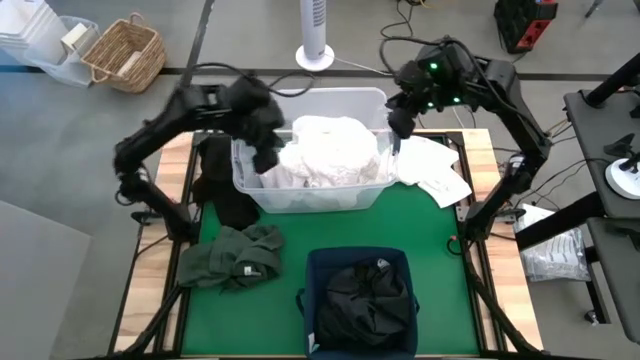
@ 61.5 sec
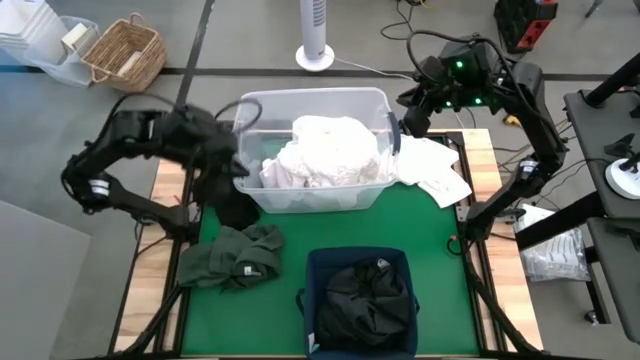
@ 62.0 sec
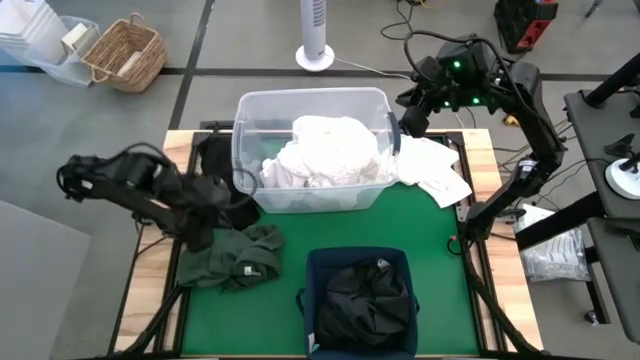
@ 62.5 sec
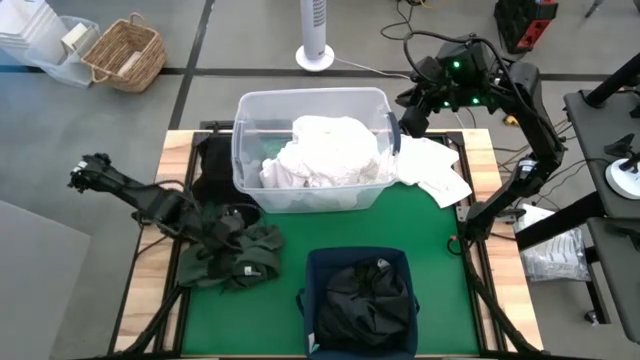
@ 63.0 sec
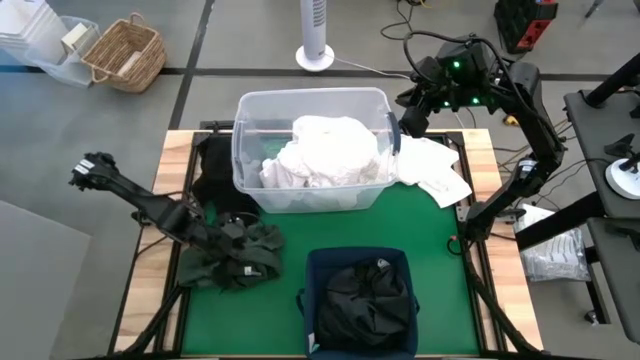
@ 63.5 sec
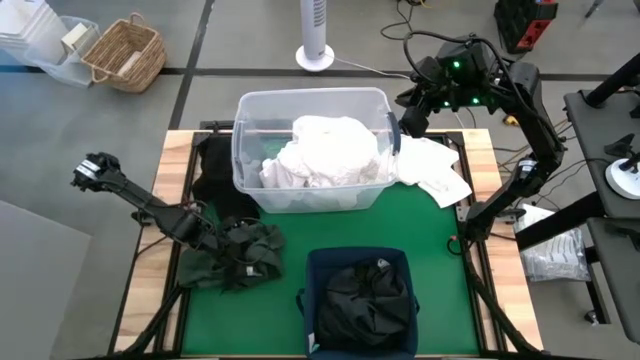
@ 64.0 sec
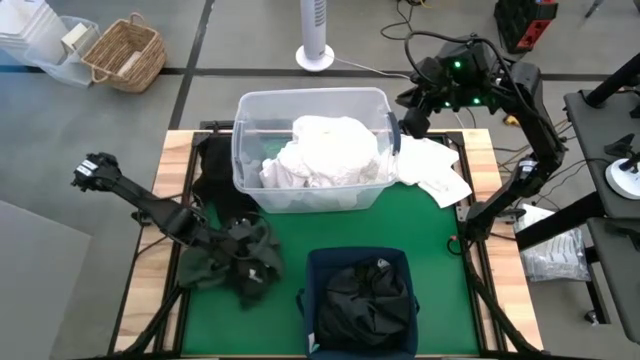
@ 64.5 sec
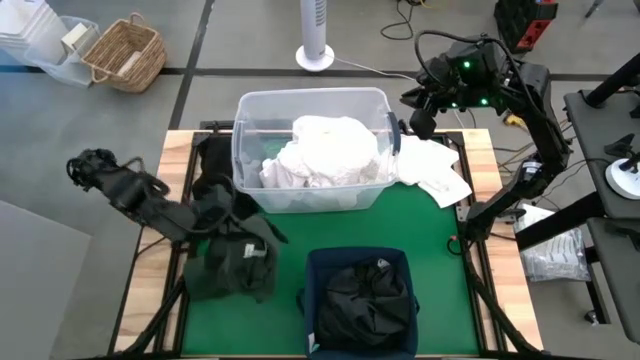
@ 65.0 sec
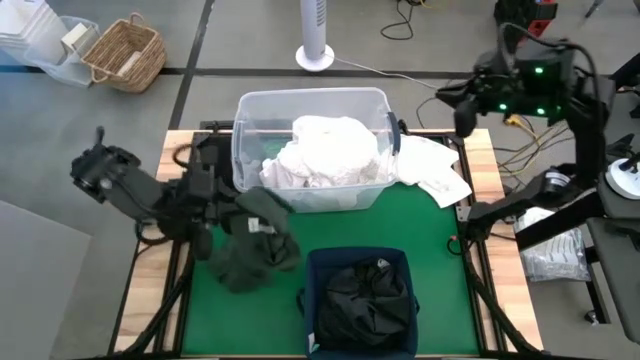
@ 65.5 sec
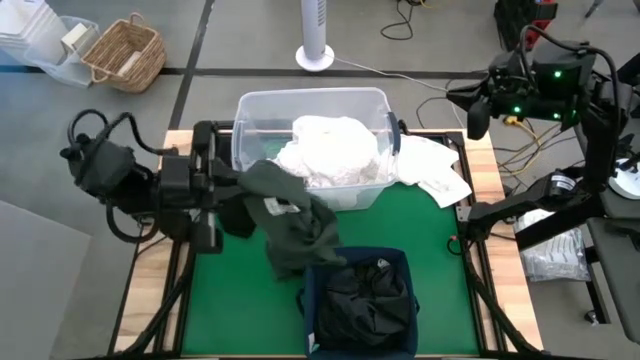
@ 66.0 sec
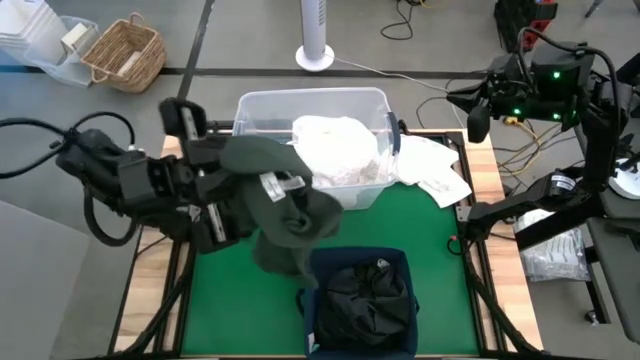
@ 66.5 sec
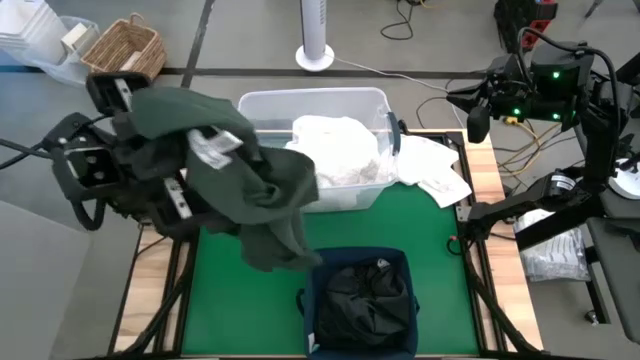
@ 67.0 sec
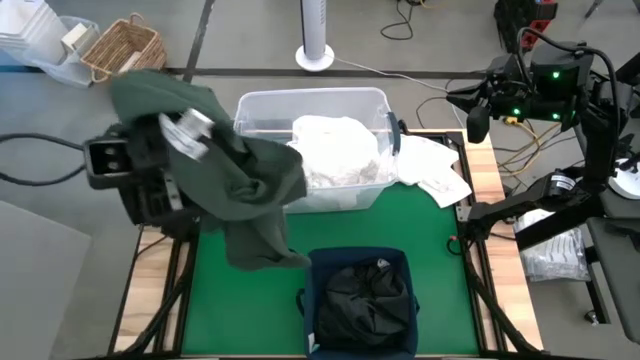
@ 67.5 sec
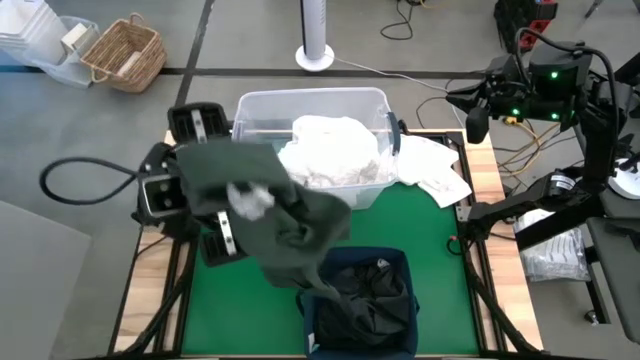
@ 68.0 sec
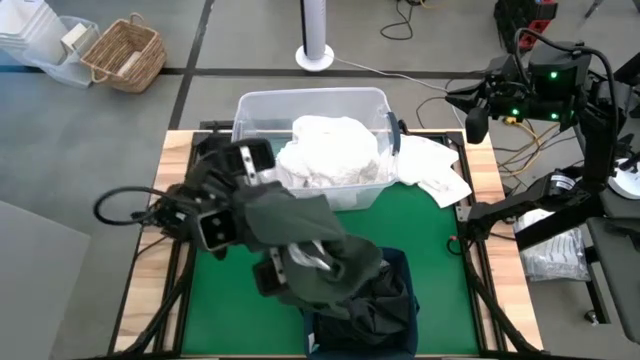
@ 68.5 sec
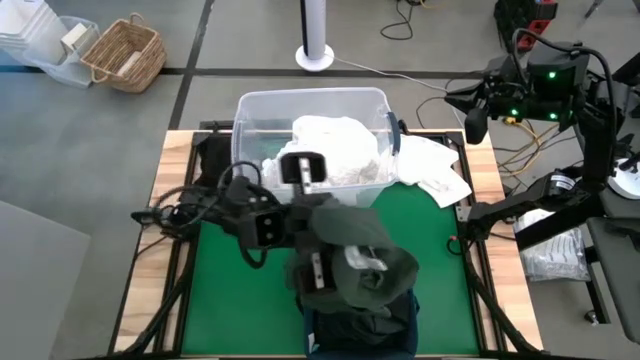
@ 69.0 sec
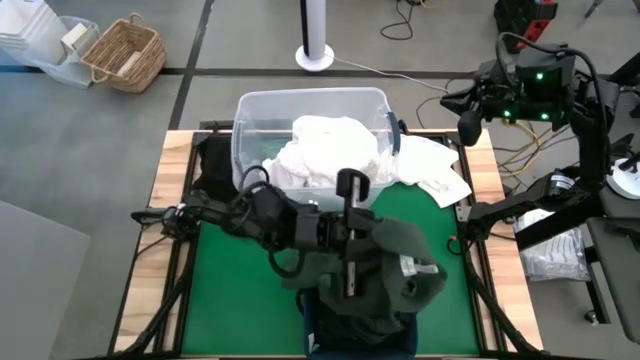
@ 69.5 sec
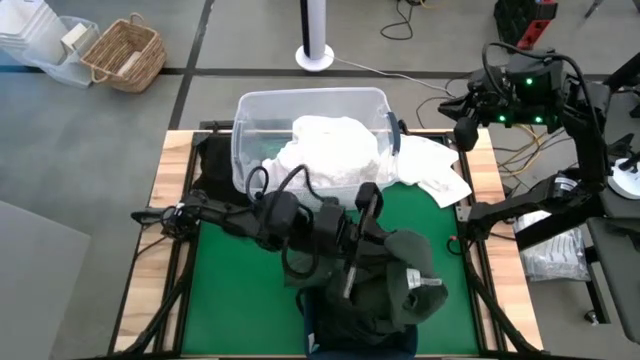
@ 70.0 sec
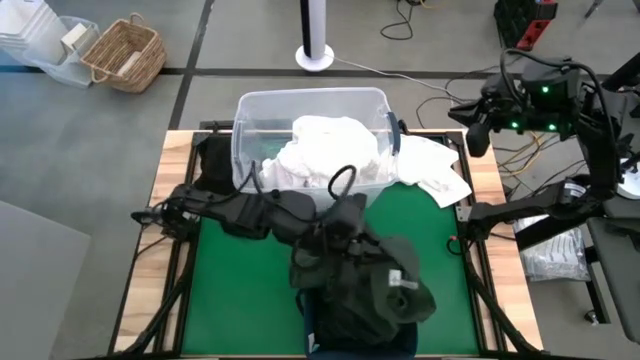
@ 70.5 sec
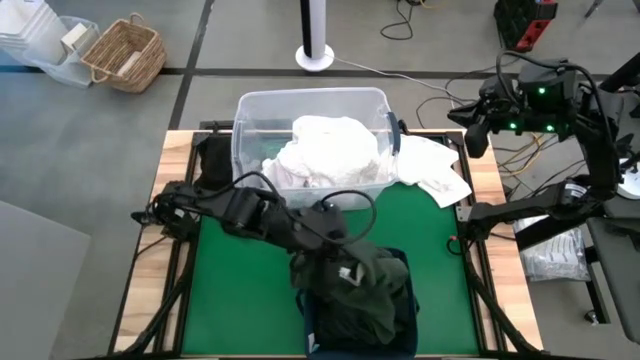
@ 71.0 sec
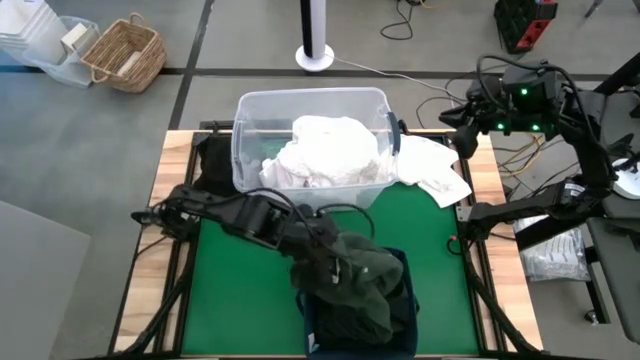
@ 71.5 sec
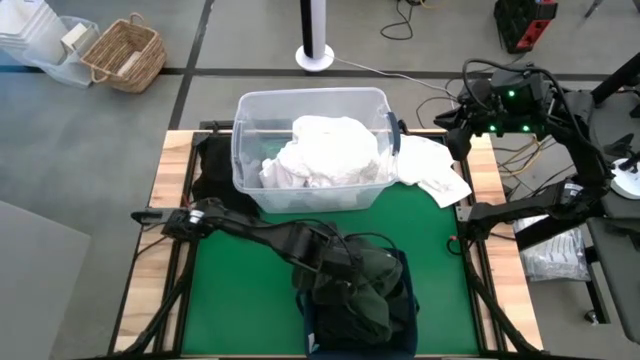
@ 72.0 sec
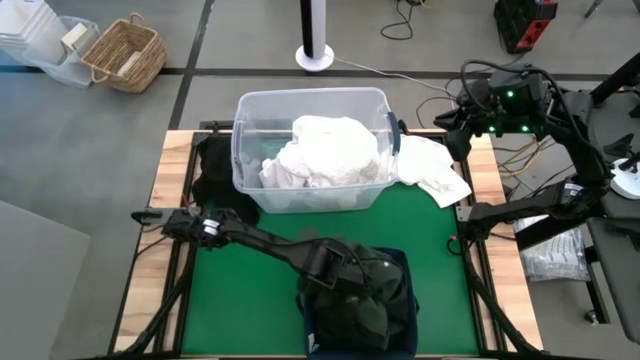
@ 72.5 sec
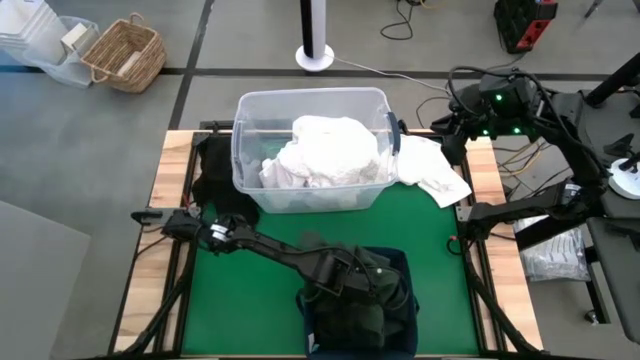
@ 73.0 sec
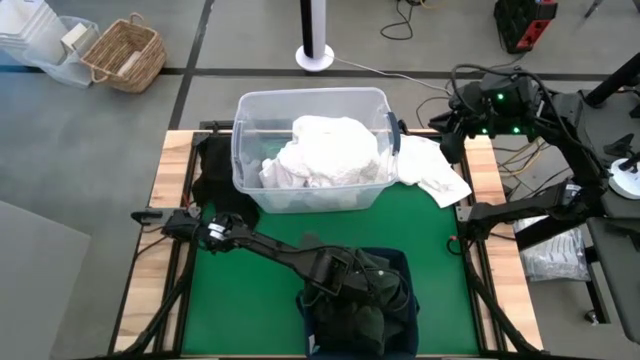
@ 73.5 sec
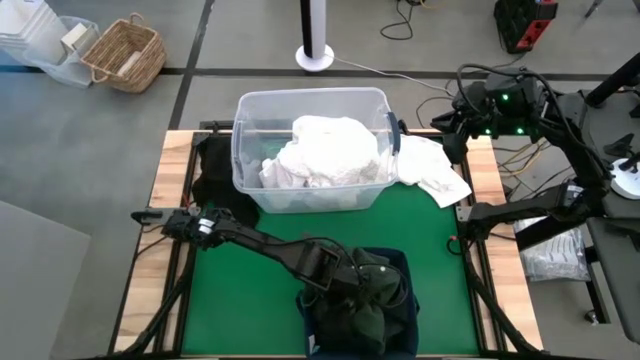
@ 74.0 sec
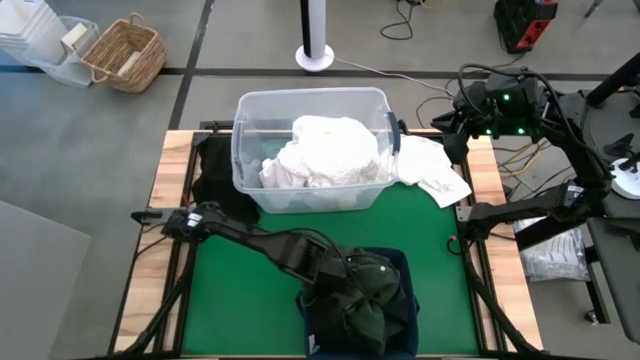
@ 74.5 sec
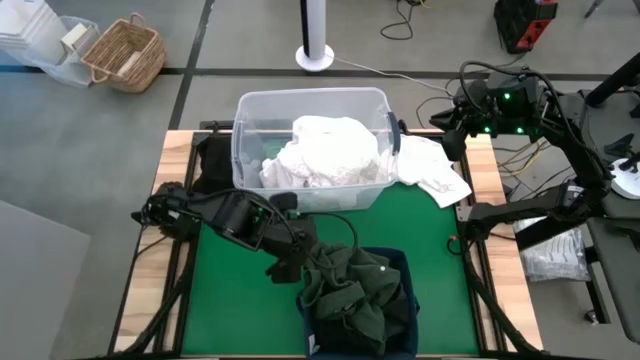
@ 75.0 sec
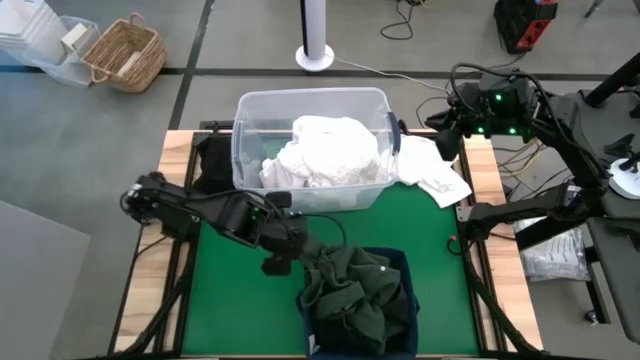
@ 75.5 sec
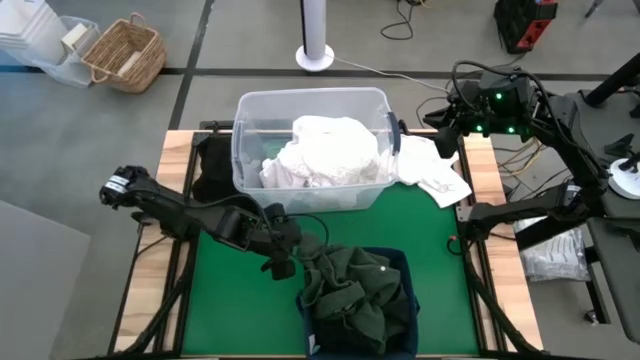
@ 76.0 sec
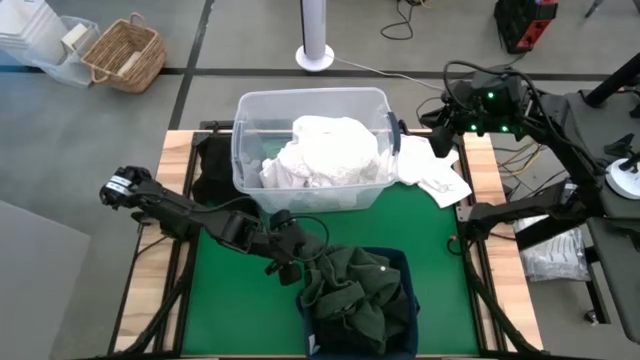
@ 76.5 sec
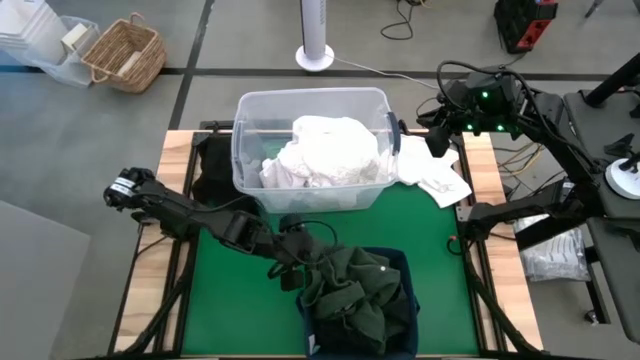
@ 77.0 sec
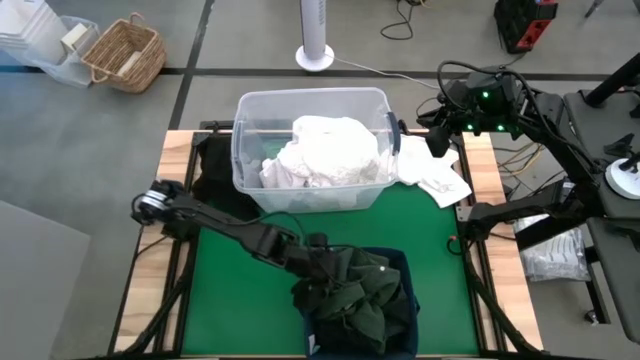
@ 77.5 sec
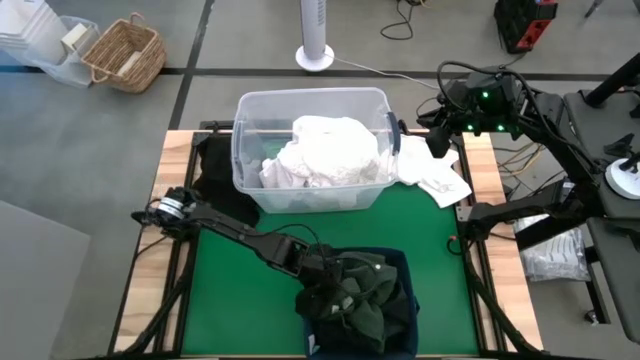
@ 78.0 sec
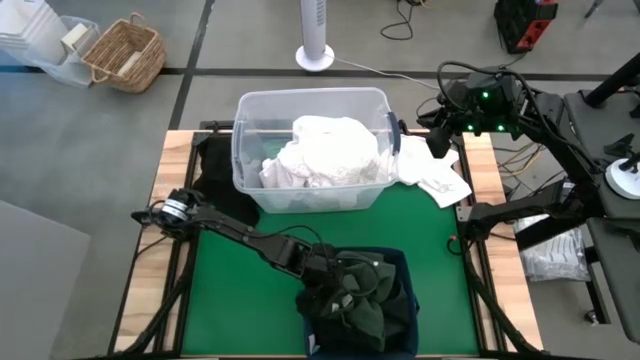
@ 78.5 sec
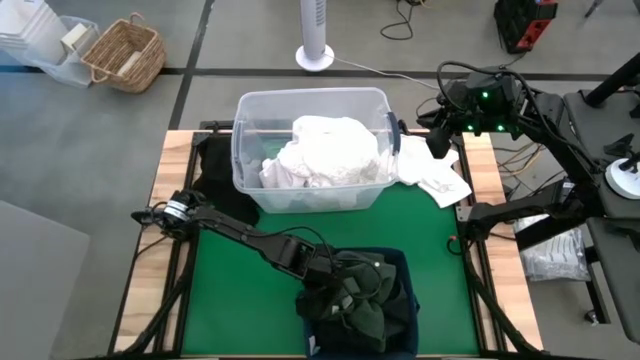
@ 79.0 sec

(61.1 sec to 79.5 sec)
Put the green polo shirt into the blue laundry bin

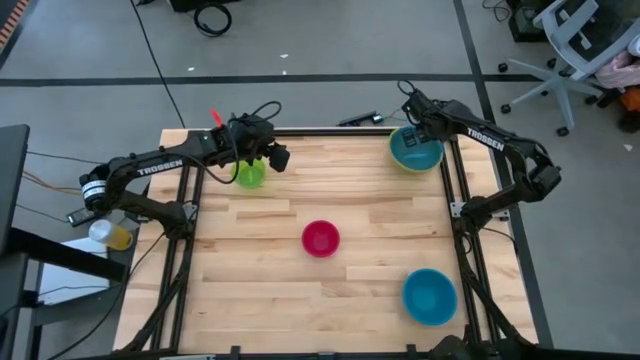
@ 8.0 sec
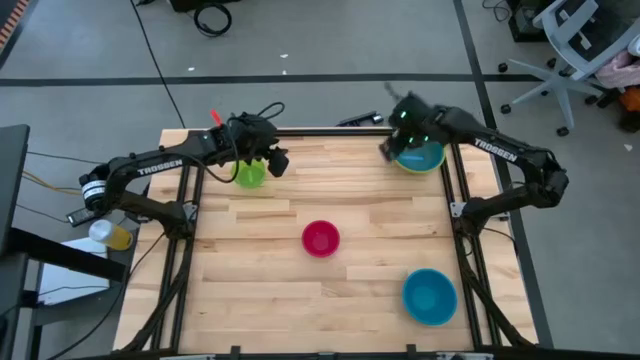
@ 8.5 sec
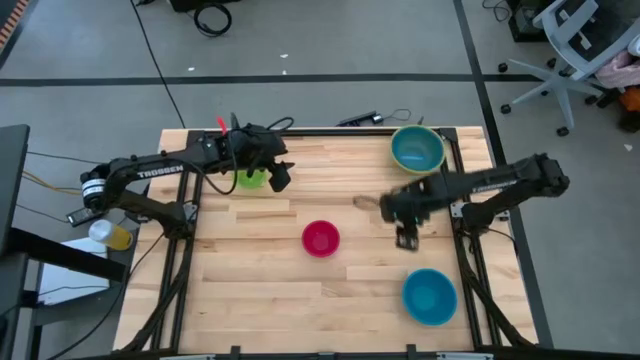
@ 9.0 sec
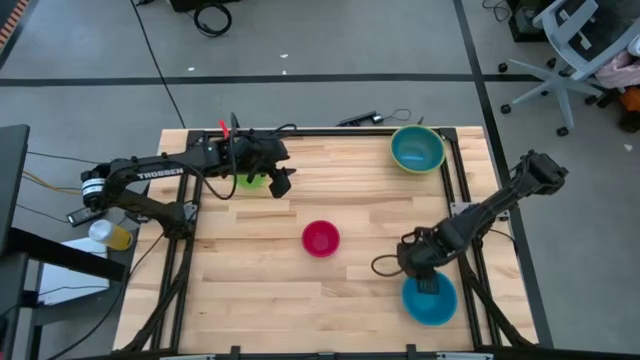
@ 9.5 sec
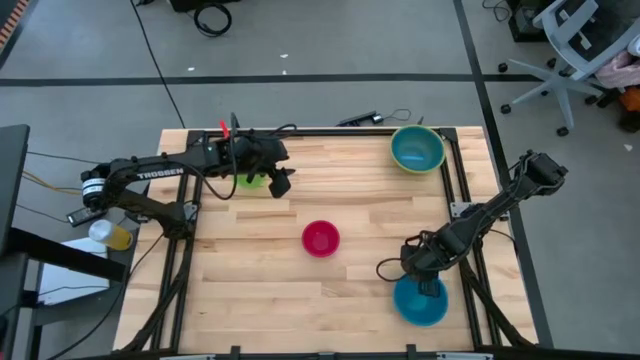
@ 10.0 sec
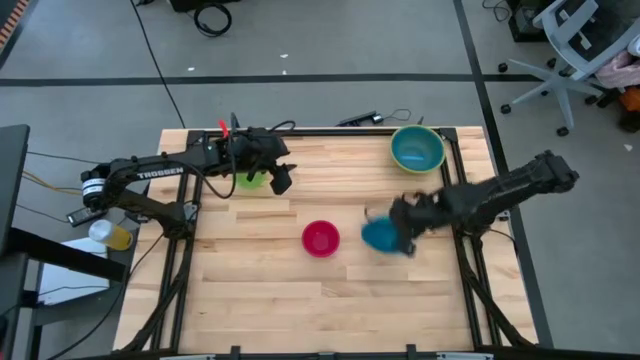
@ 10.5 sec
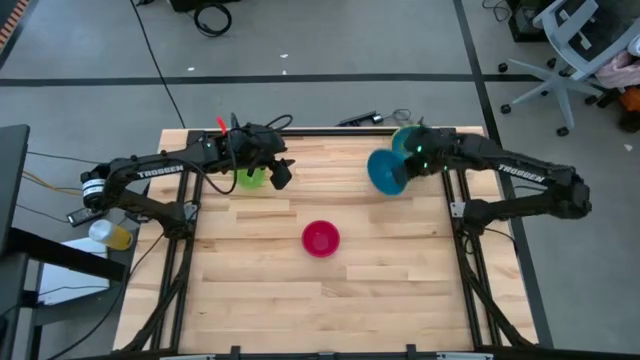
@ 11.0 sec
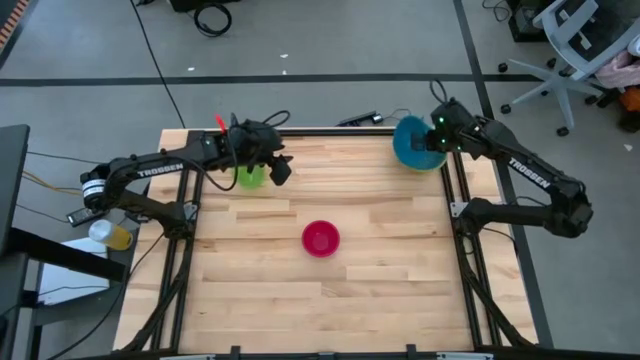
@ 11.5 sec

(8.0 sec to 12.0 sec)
Stack the small blue bowl on top of the large blue bowl
